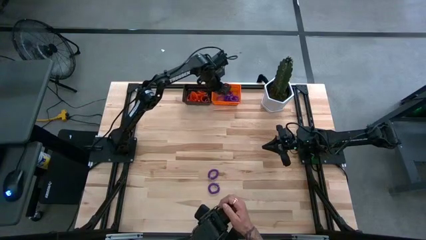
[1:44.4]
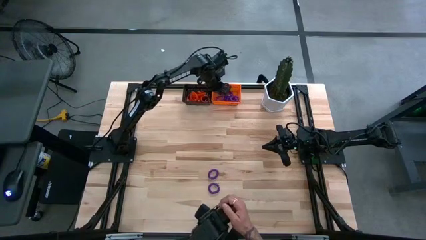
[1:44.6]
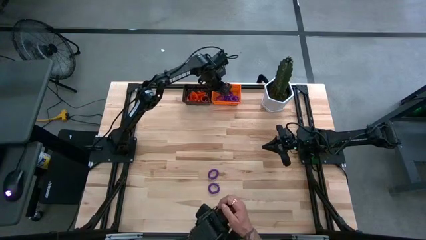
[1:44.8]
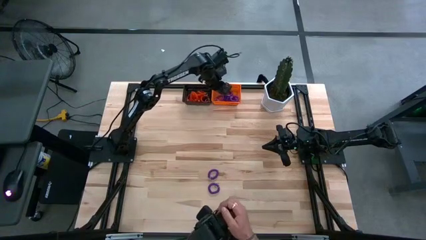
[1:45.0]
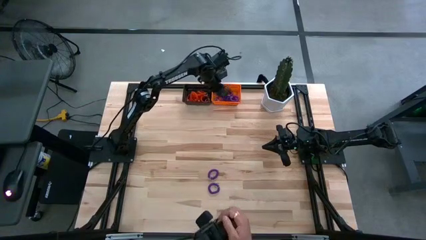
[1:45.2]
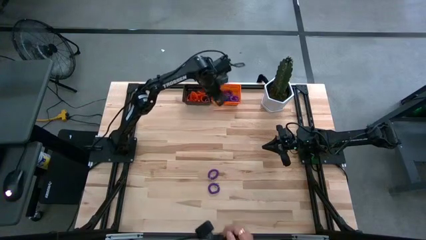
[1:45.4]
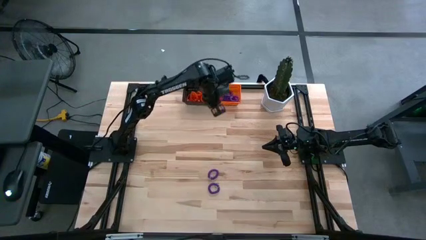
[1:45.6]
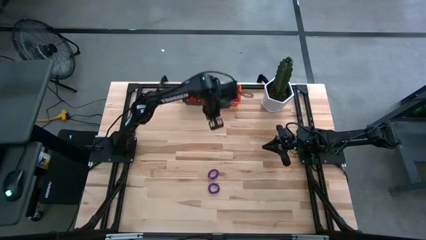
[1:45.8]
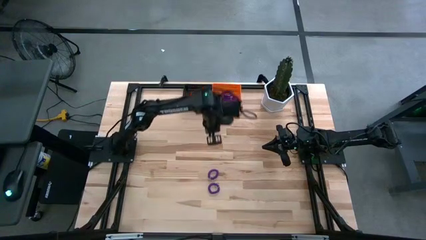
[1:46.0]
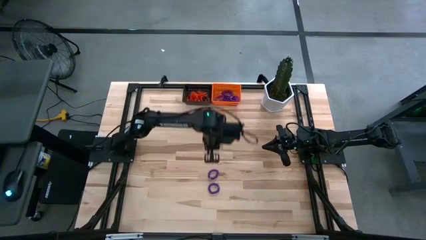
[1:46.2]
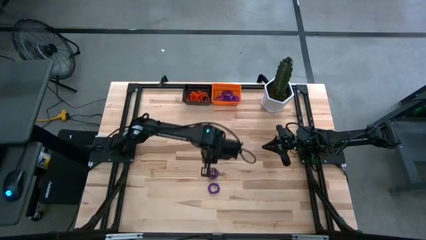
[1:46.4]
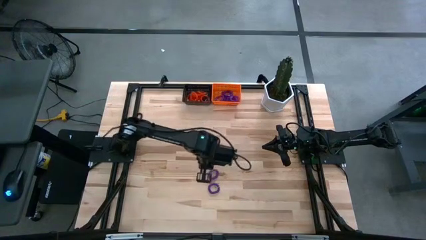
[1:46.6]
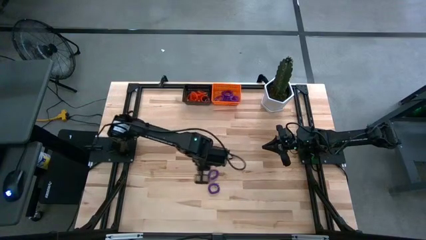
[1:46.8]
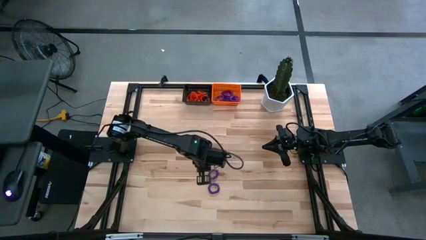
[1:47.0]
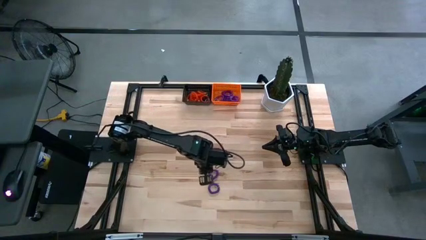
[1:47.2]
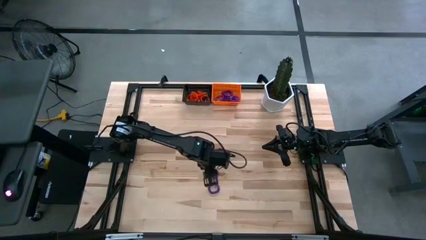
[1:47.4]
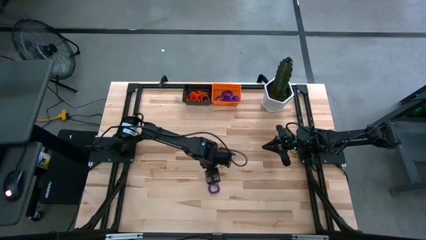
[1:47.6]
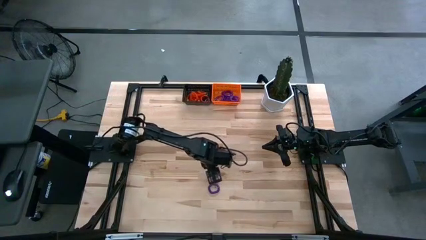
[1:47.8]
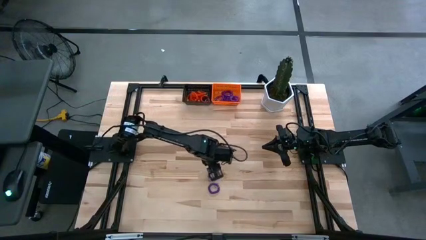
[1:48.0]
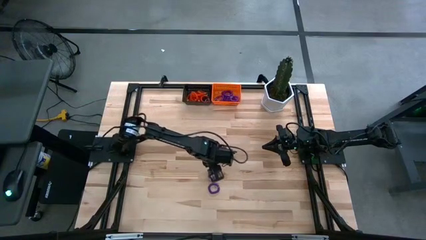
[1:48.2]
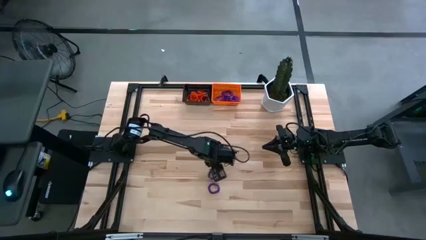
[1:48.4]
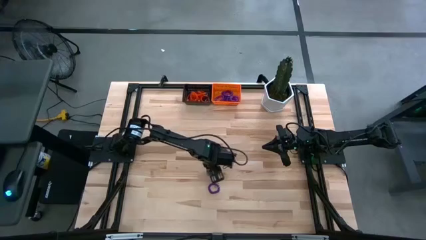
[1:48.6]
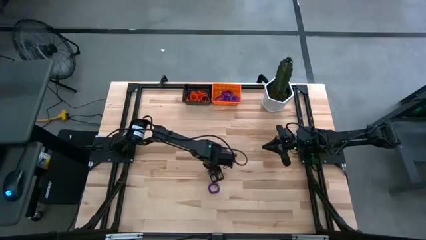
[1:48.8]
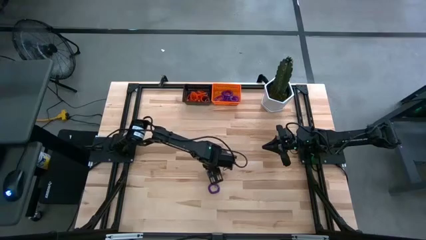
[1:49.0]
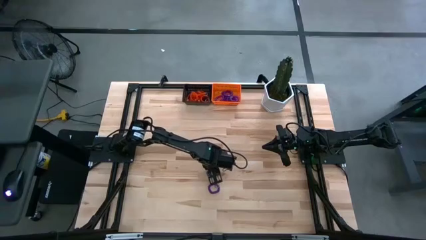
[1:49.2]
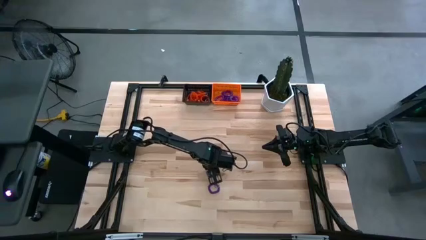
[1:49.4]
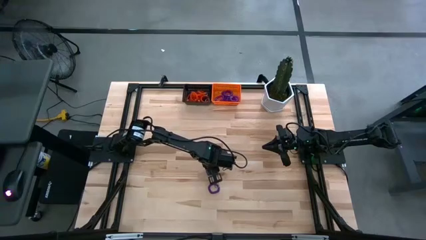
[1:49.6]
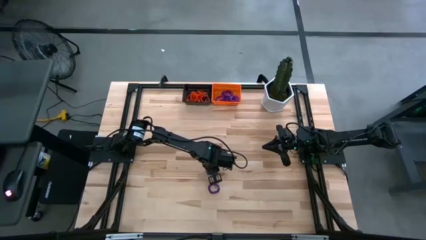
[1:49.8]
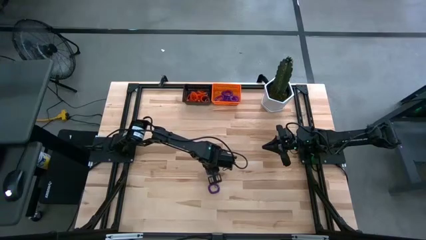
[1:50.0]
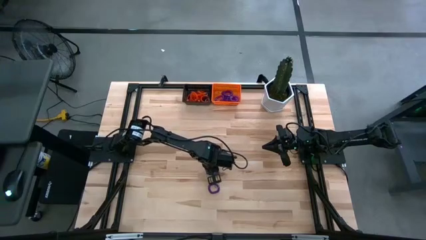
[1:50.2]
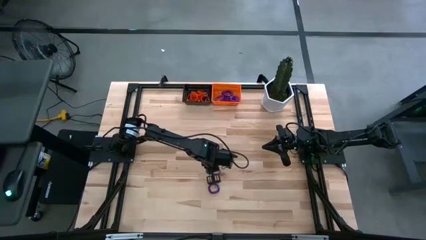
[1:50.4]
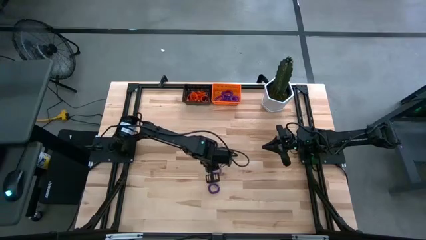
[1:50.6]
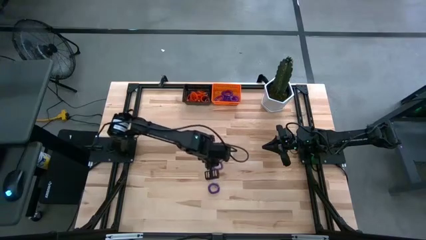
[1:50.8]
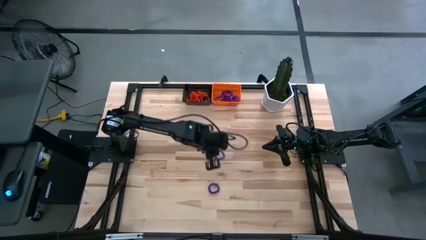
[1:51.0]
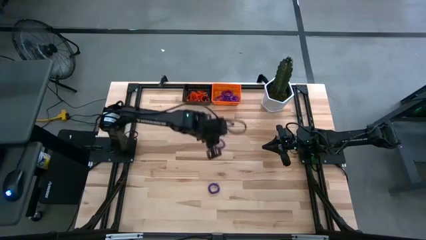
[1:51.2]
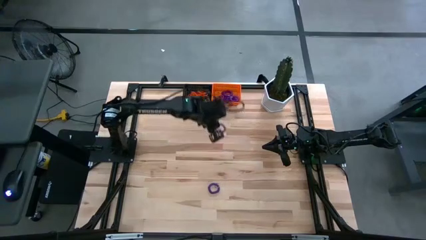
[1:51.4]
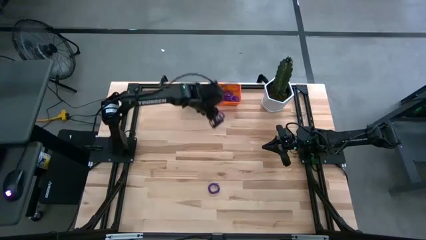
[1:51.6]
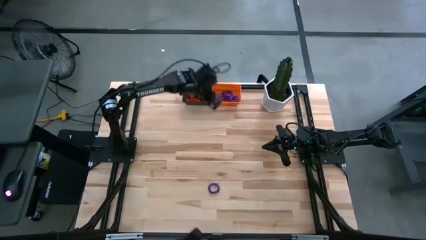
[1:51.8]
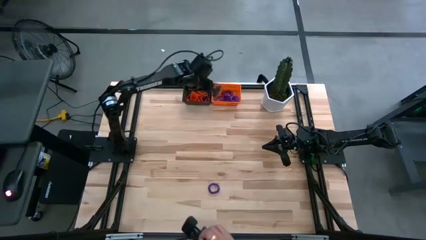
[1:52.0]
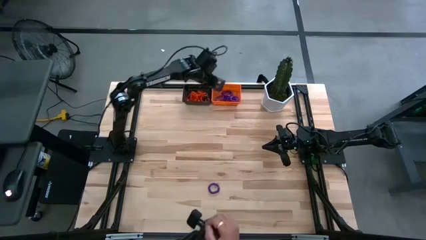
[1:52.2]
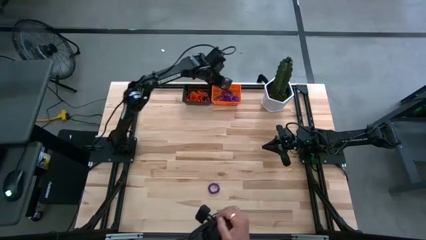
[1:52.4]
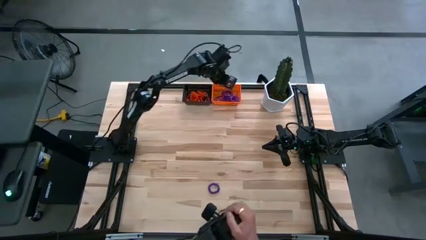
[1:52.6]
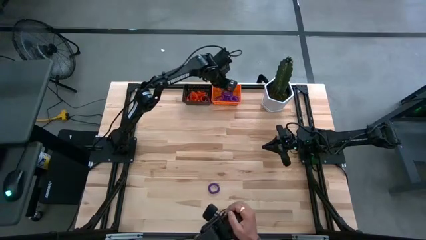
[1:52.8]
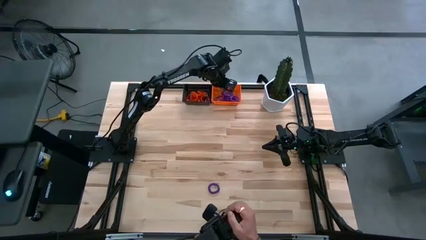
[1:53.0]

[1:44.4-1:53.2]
Task: Sort spring keychains into baskets
Put the violet spring keychain into the orange basket

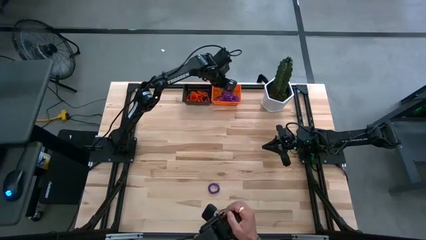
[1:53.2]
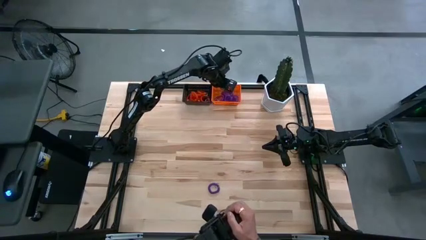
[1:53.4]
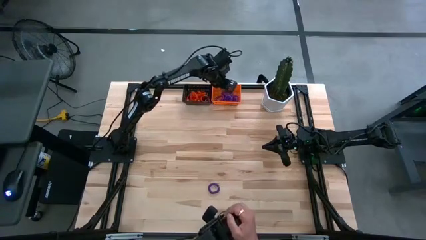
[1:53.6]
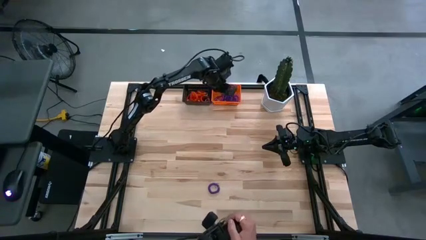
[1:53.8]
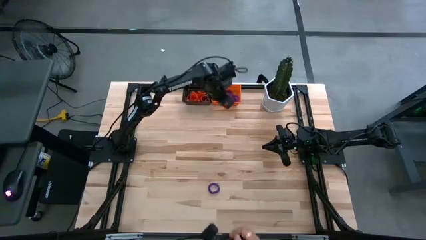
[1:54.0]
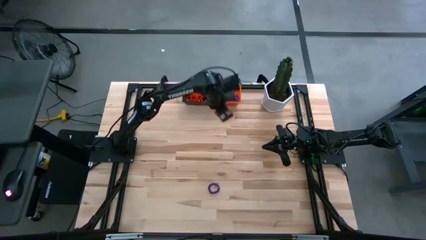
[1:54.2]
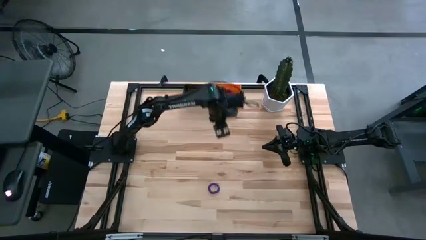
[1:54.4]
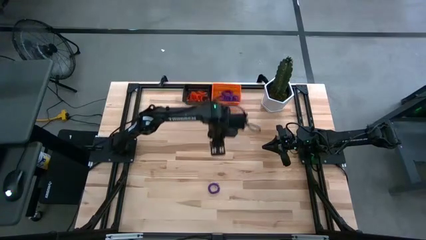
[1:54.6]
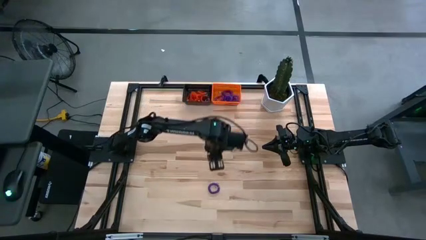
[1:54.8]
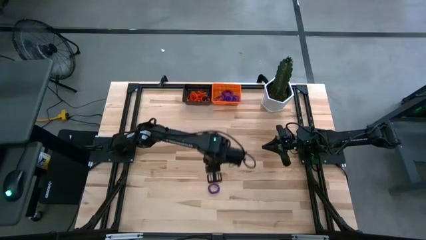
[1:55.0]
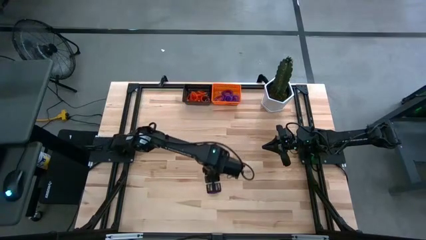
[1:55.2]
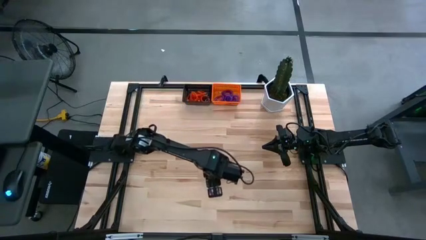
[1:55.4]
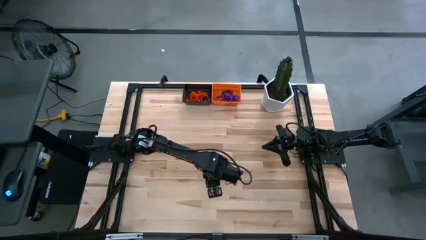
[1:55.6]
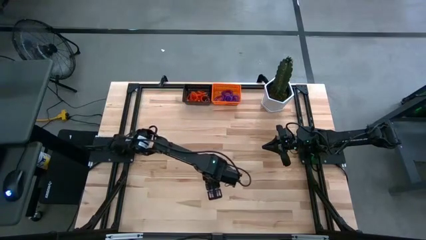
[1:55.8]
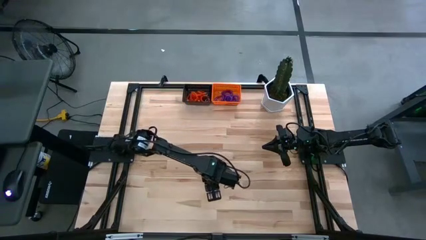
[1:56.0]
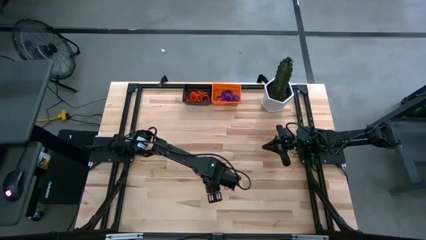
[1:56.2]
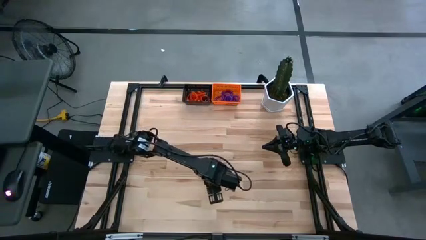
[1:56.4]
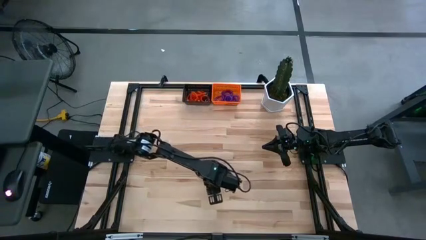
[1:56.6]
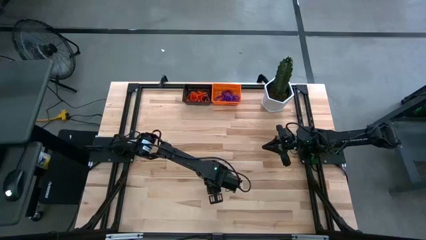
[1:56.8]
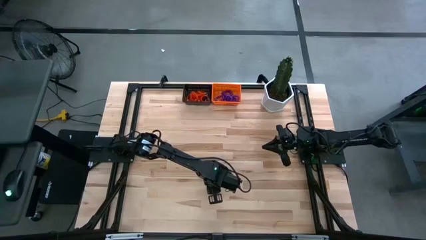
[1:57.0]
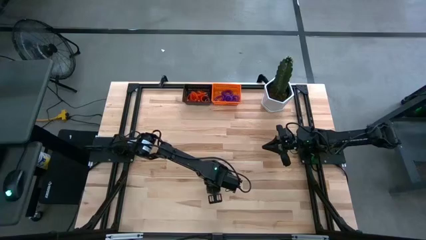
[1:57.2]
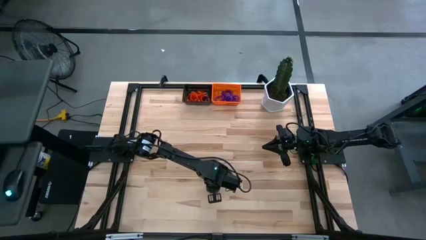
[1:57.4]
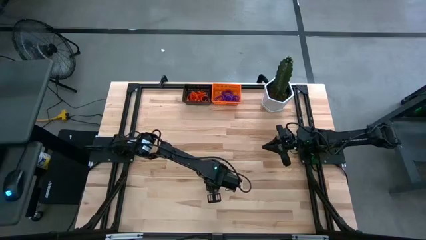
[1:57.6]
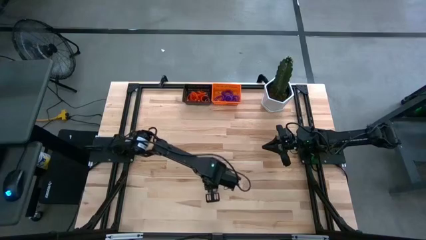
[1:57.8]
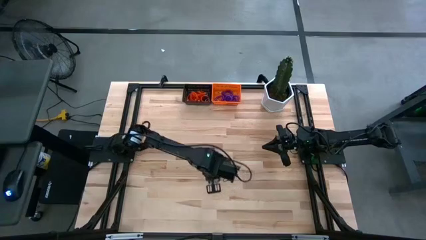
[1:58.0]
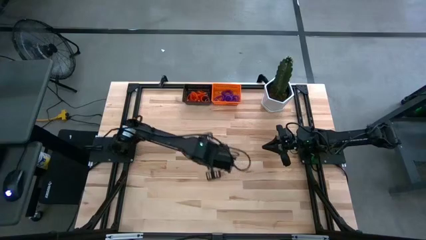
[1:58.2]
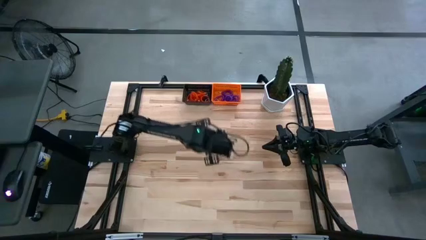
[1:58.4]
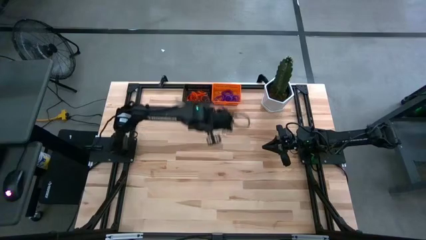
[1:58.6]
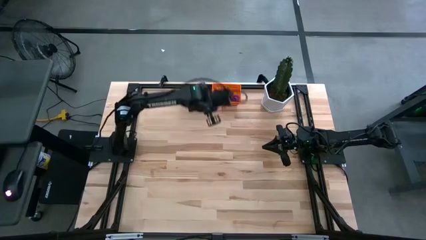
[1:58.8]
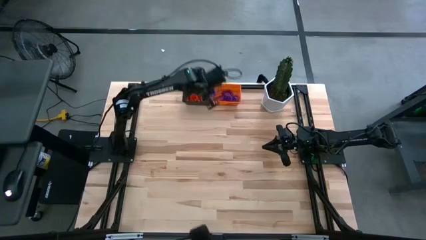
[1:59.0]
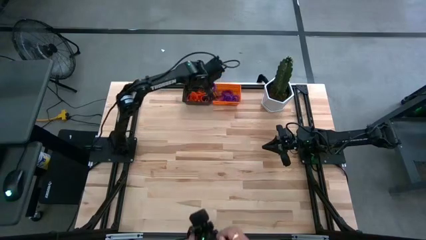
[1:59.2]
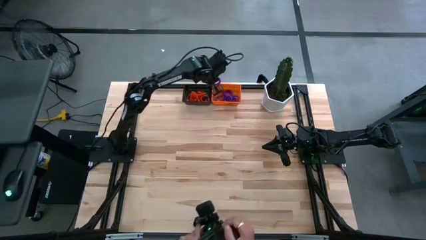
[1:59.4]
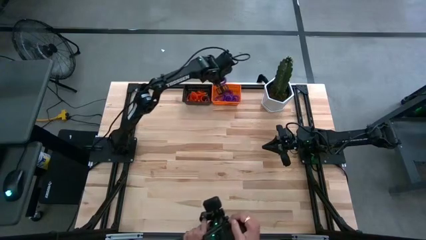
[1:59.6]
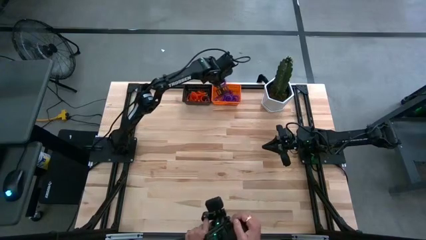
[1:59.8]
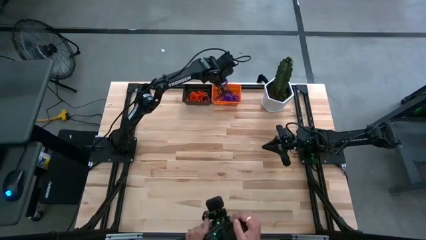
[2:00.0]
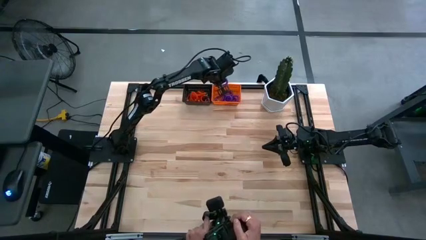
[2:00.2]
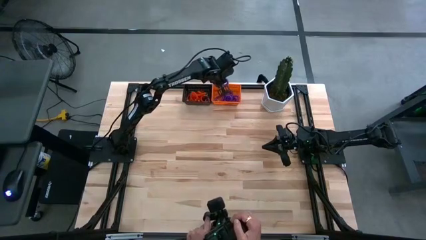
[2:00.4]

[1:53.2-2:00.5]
Put the violet spring keychain into the orange basket
